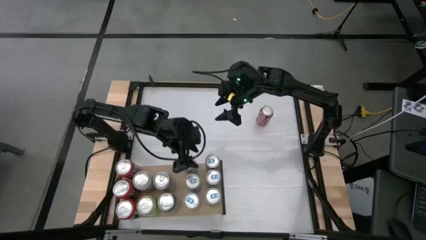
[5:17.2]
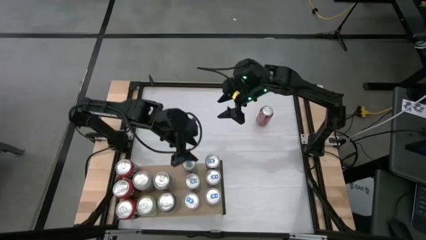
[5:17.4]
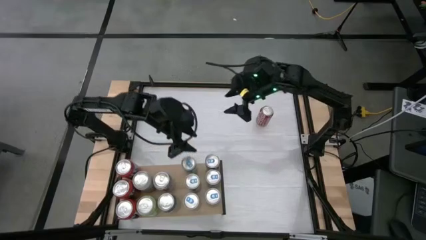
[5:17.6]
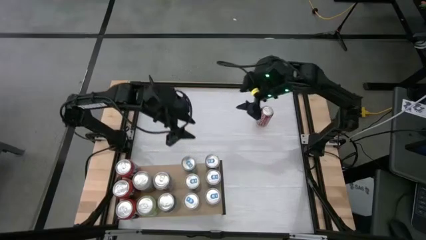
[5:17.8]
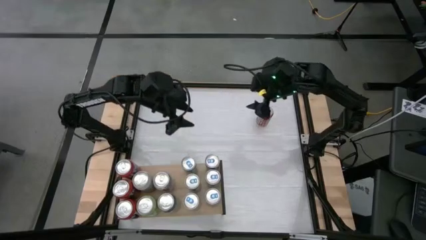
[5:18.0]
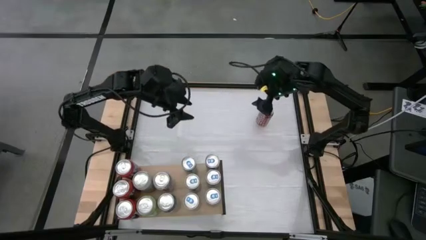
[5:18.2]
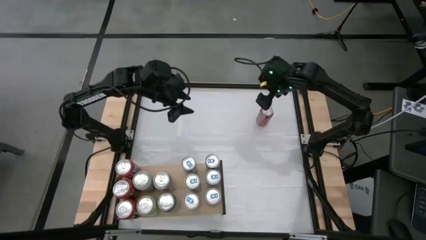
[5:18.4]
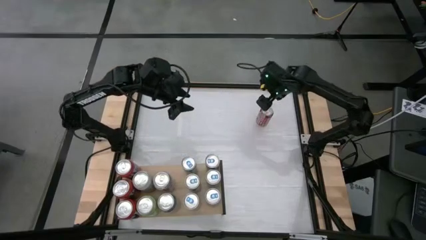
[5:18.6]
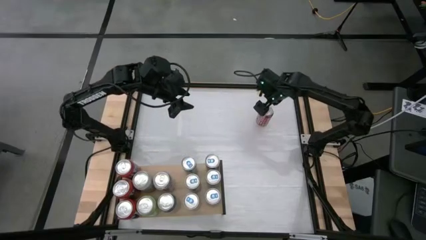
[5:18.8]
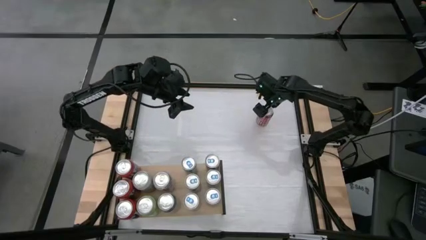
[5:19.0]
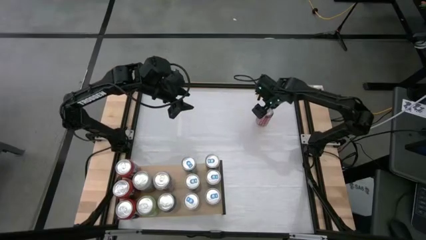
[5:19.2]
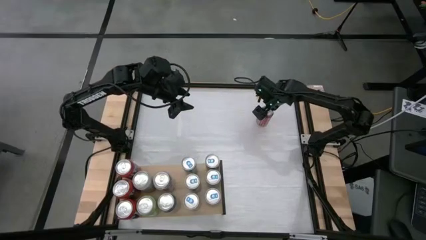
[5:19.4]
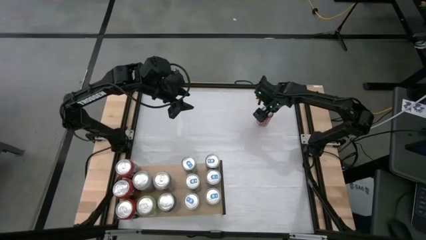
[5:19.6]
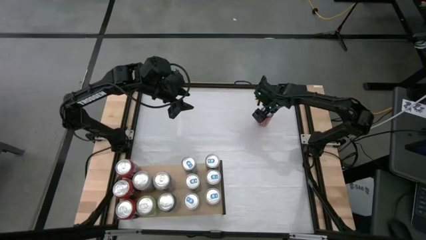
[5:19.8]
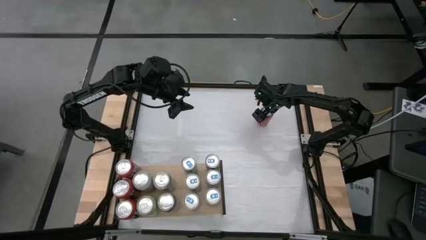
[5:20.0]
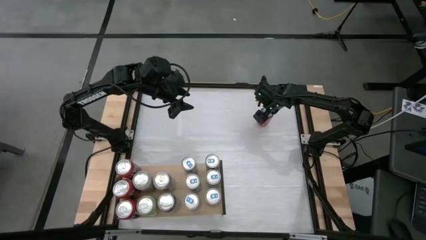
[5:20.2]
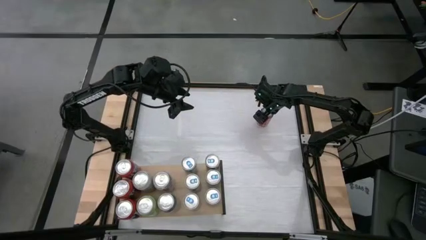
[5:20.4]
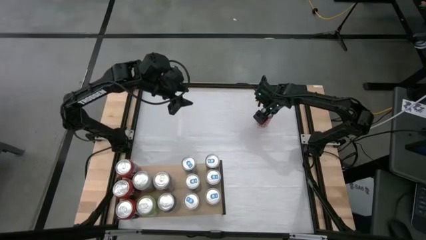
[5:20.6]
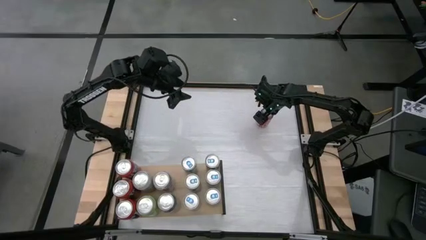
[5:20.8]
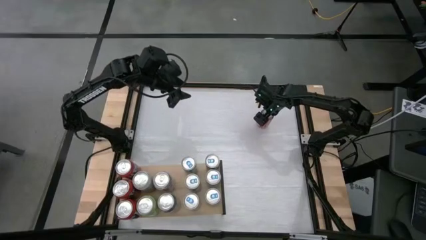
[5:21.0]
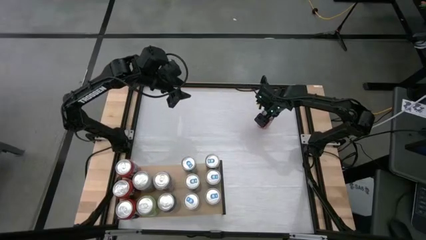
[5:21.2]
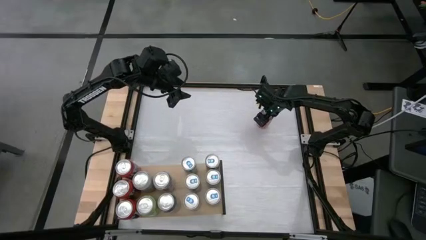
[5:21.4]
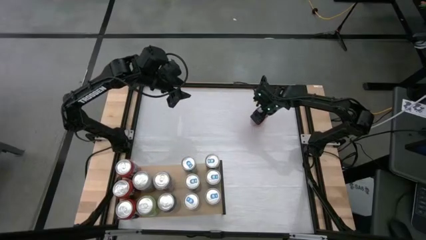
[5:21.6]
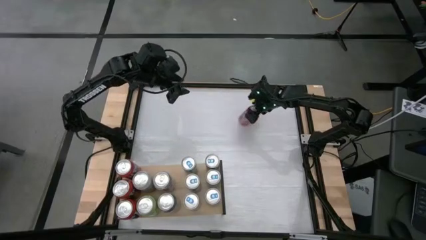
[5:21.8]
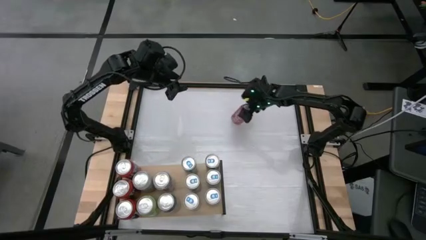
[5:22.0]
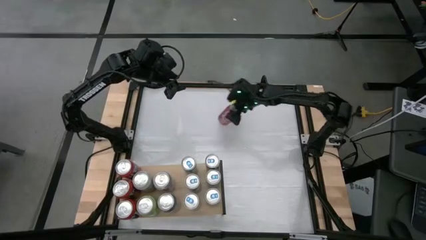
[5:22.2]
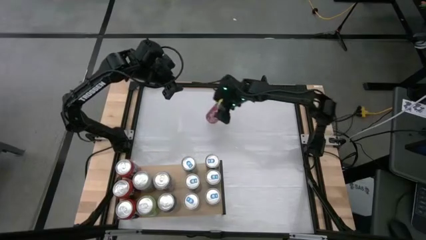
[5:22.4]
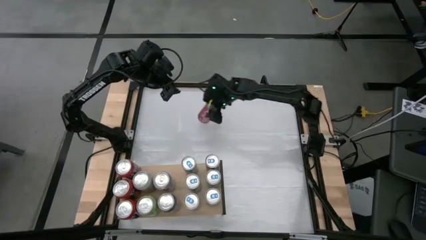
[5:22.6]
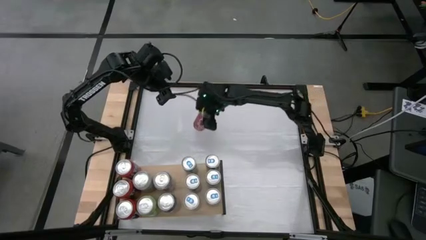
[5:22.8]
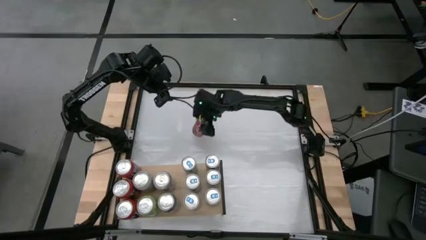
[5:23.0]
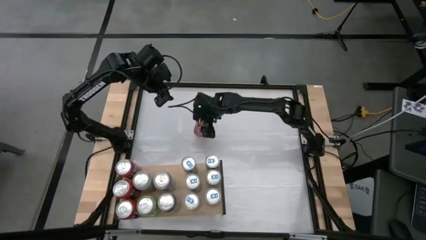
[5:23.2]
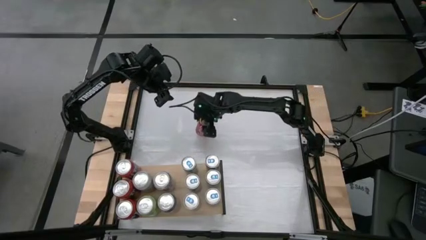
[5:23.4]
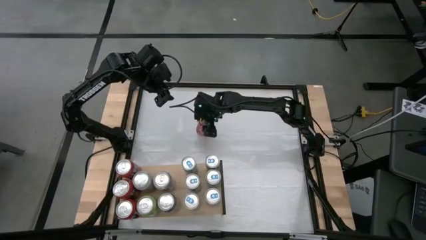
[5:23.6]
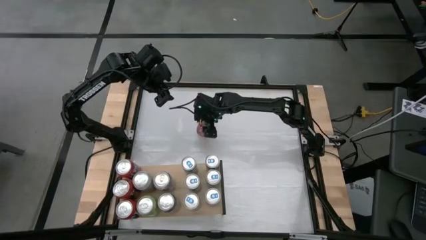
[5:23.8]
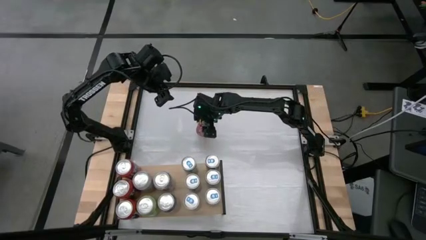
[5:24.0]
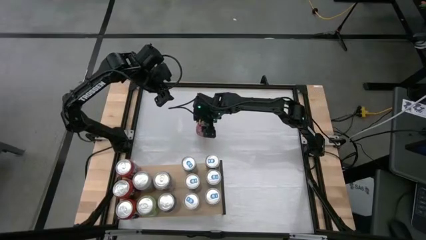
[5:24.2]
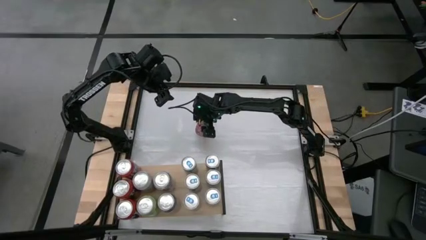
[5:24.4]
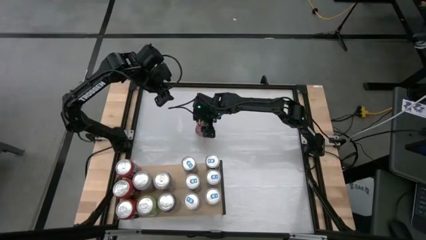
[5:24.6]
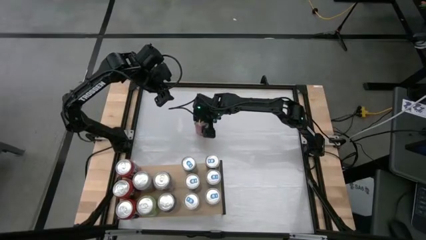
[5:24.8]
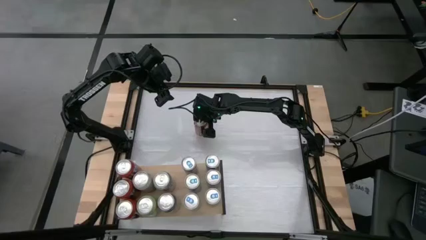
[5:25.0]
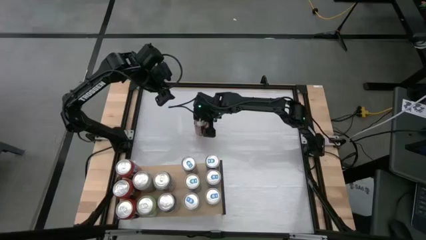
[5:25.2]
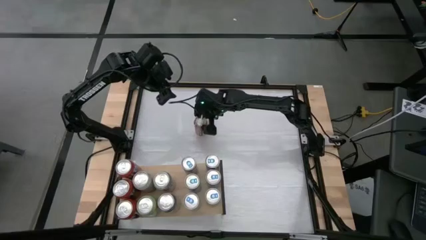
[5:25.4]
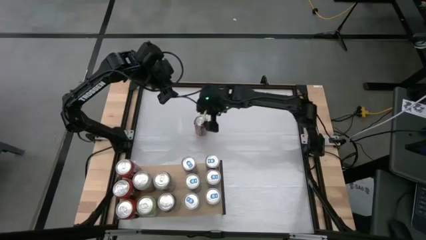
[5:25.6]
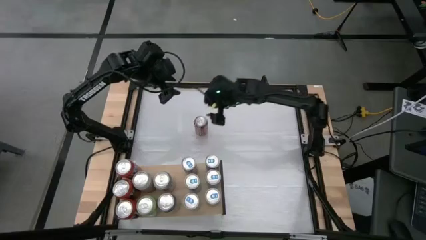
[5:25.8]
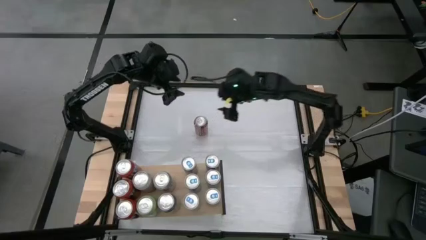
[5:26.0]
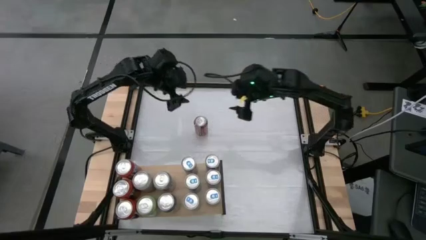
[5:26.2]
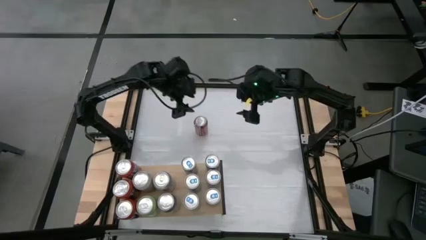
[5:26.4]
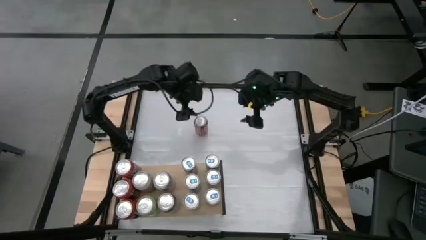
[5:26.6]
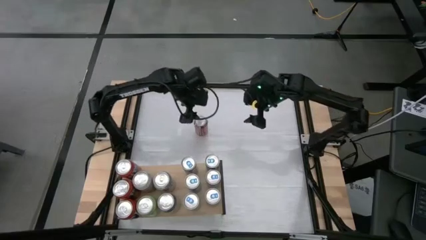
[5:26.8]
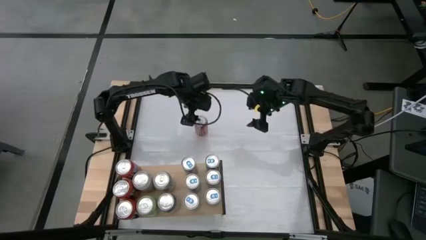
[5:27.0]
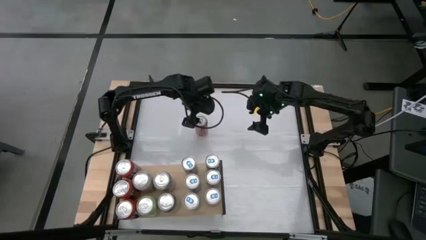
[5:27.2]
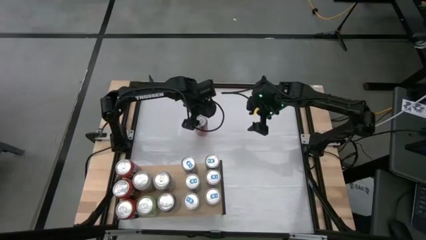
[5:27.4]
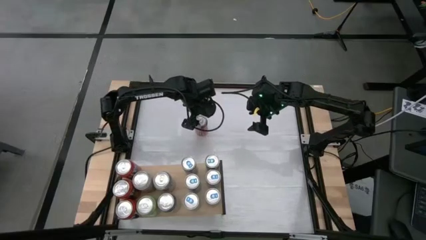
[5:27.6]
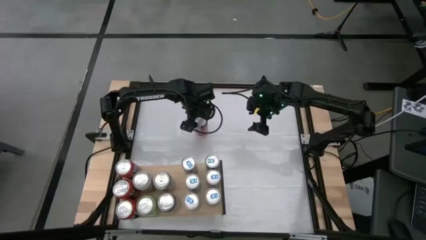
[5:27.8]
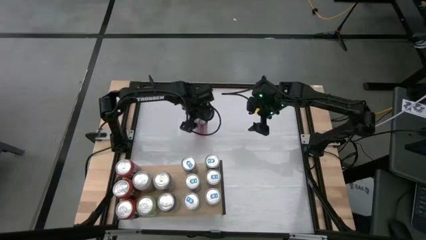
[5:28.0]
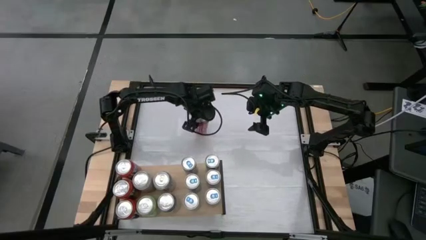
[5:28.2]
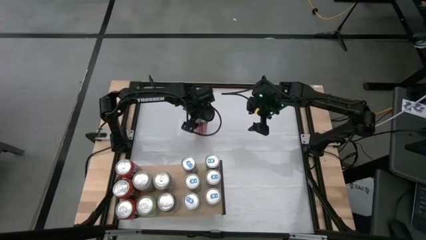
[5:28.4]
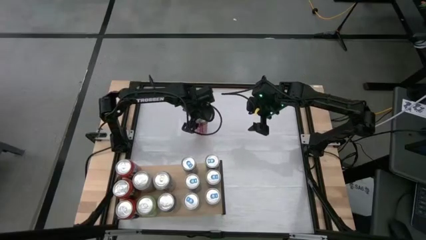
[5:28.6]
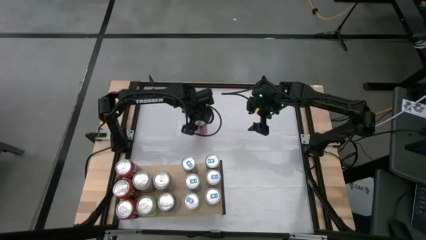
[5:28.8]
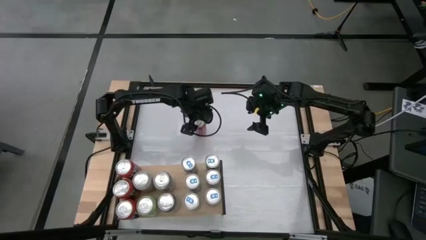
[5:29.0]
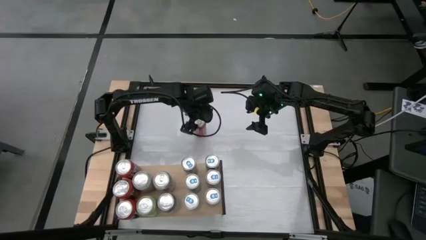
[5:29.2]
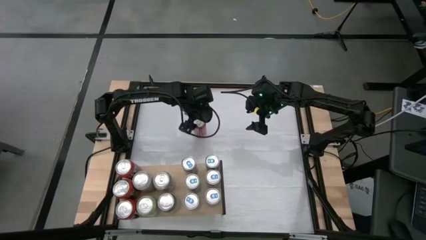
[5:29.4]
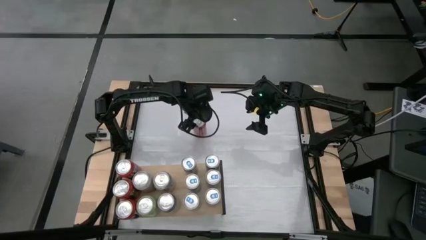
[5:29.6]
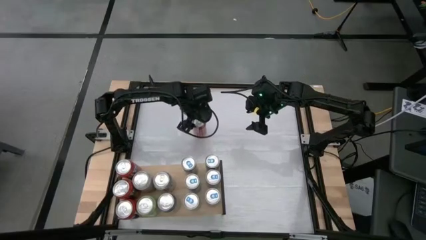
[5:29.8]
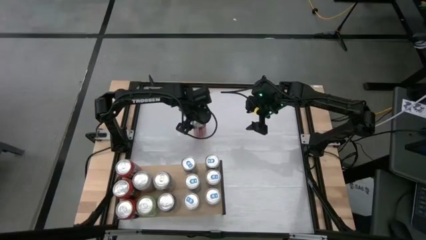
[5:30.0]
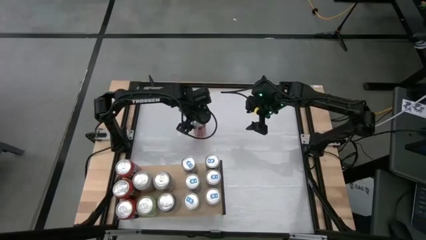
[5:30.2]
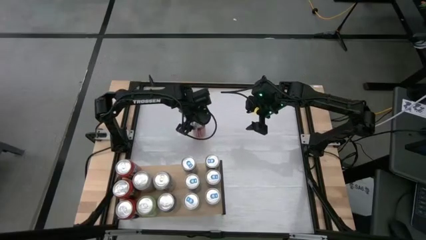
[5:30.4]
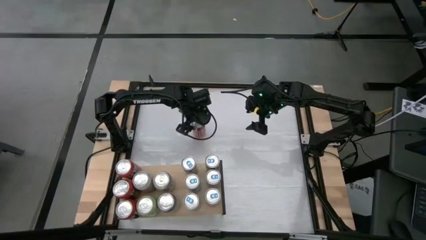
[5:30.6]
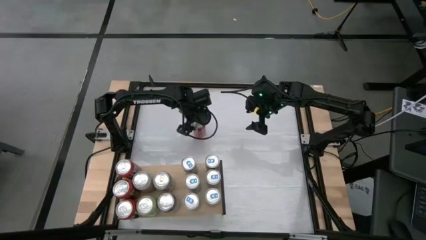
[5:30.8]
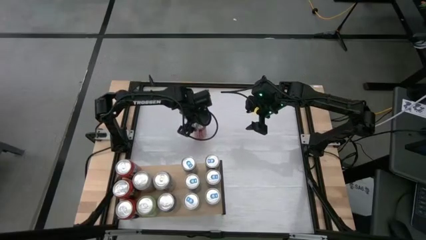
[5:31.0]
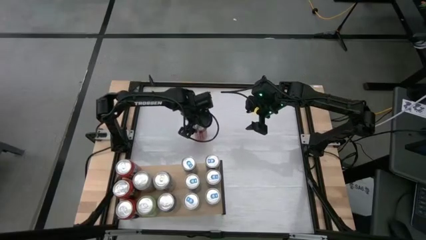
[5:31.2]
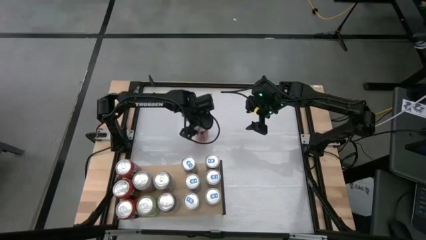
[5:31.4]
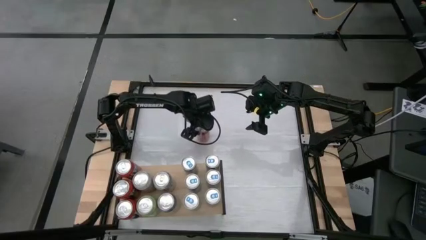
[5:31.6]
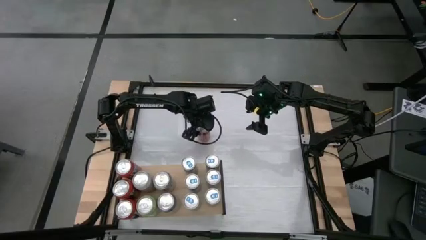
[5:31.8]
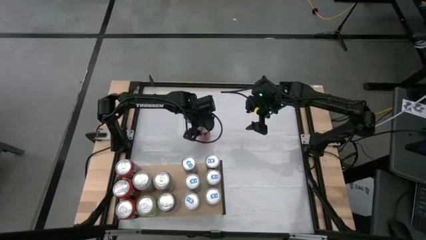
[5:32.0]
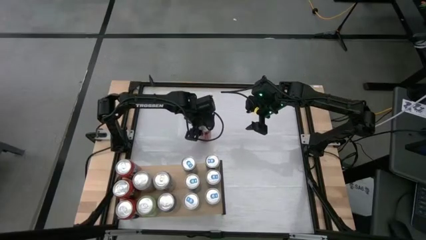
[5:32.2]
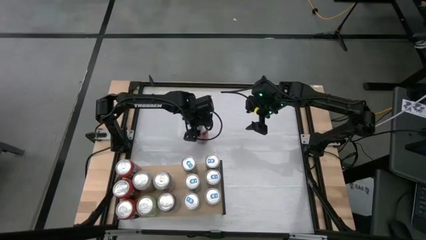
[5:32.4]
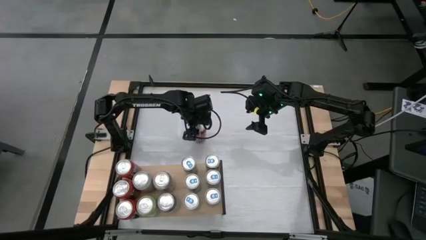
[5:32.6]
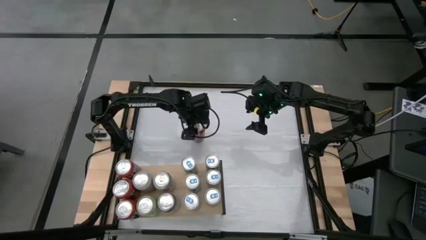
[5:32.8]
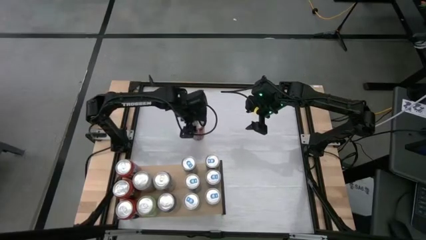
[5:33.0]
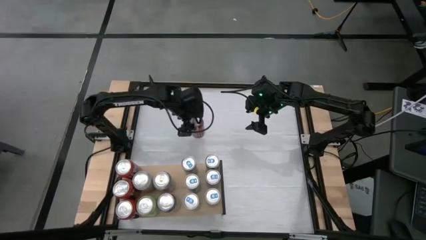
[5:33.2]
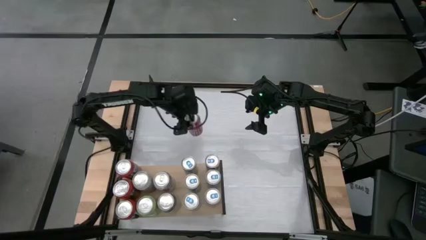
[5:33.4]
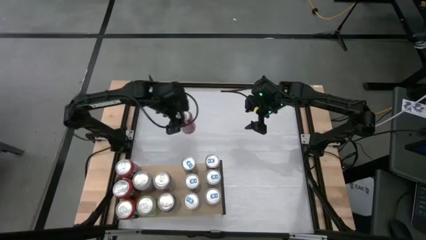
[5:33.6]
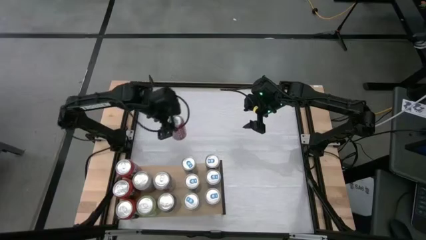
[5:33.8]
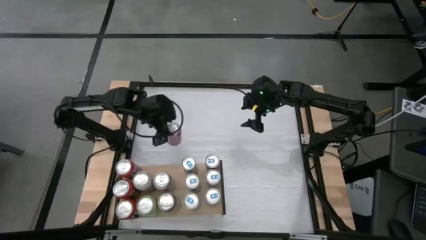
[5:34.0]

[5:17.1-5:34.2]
Task: Place canned beverage on shelf
Put the red soda can on the shelf

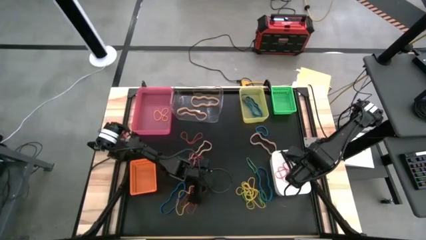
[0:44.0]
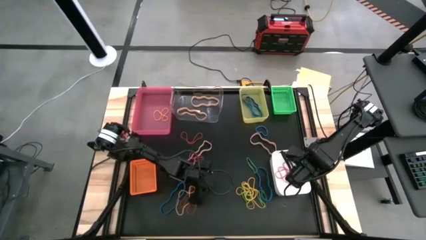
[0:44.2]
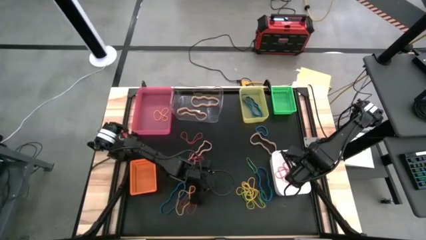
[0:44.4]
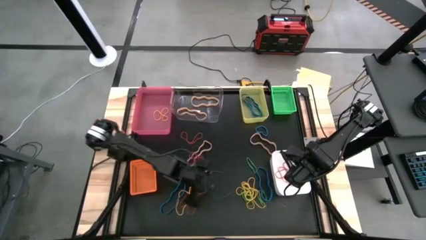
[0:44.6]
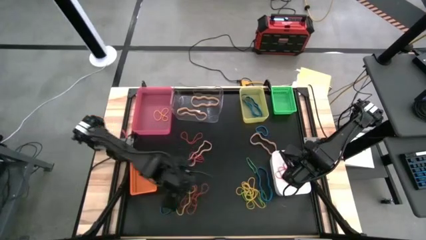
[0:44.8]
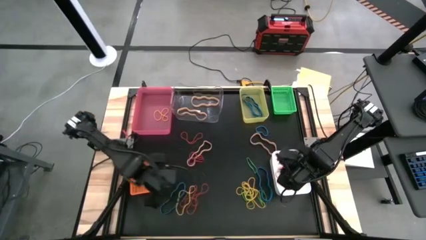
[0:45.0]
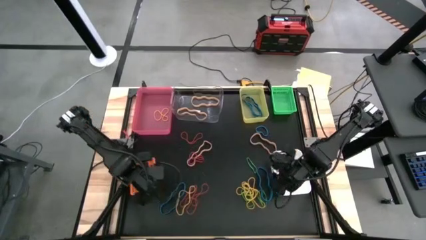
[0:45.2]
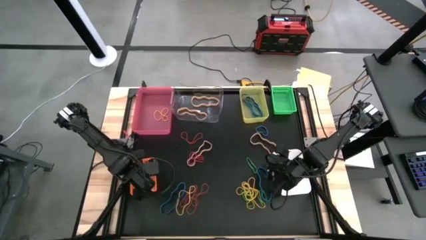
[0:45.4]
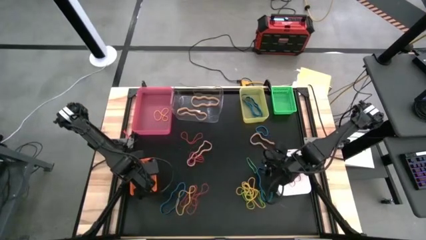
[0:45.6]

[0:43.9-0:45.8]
Task: Sort rubber bands into baskets
Put the green rubber band into the orange bin
